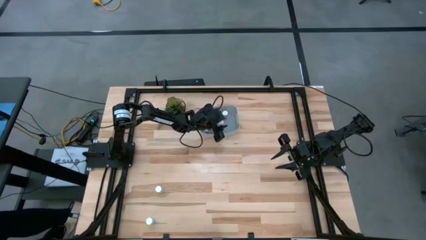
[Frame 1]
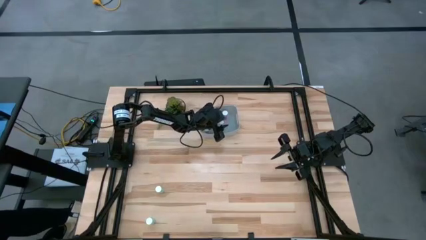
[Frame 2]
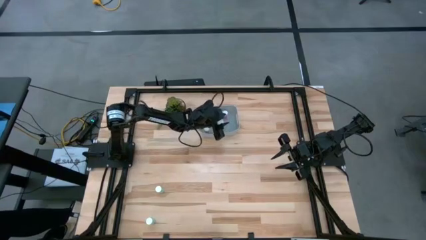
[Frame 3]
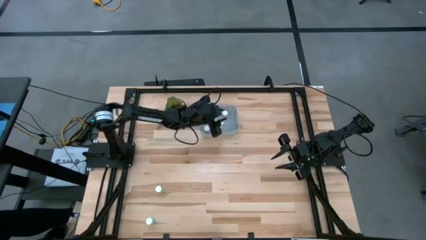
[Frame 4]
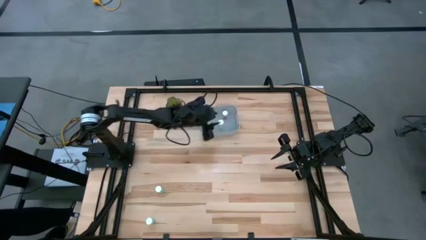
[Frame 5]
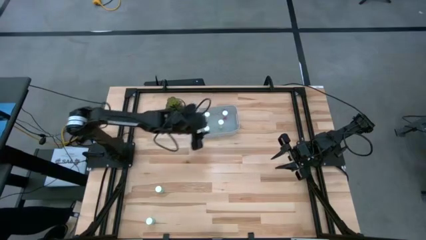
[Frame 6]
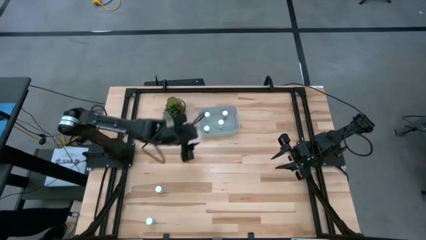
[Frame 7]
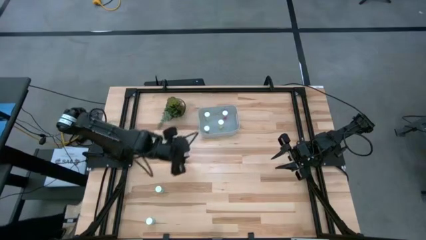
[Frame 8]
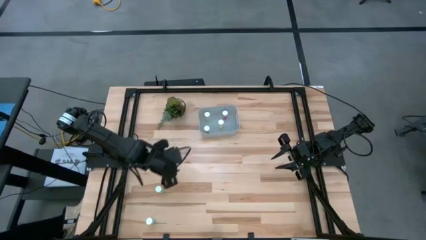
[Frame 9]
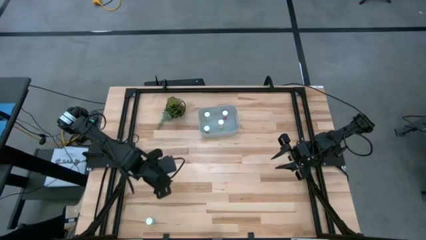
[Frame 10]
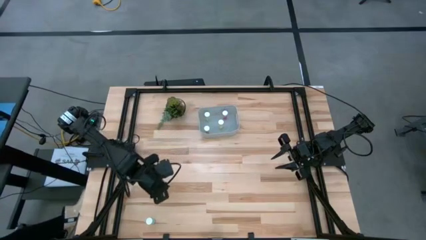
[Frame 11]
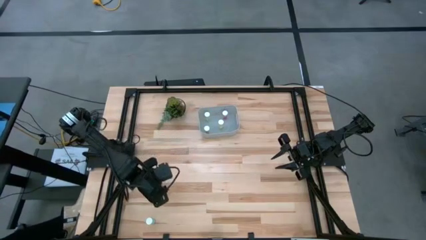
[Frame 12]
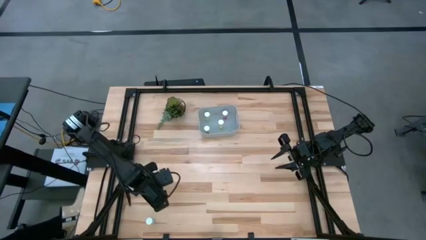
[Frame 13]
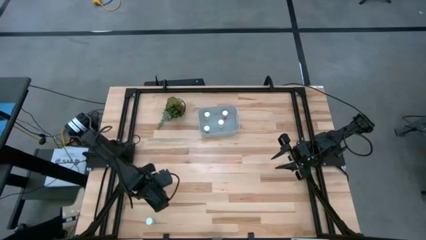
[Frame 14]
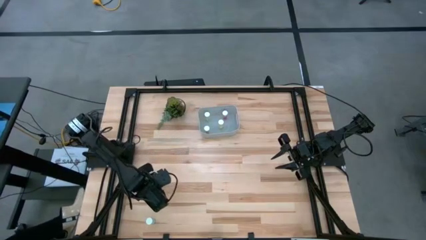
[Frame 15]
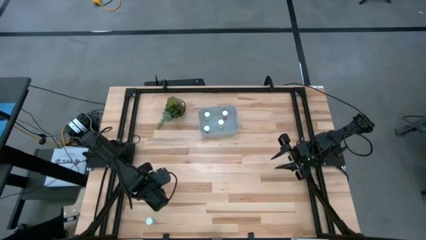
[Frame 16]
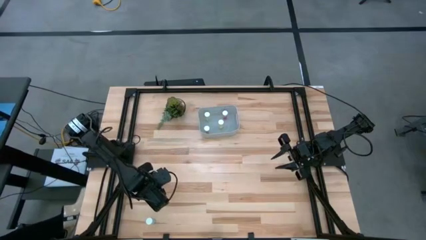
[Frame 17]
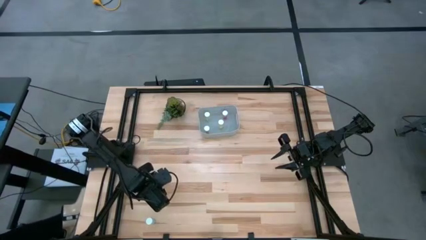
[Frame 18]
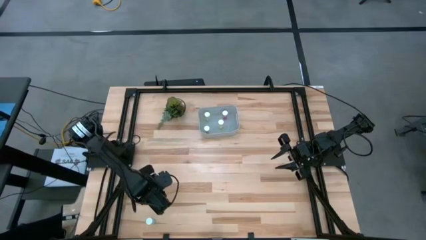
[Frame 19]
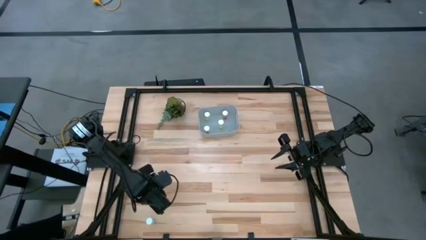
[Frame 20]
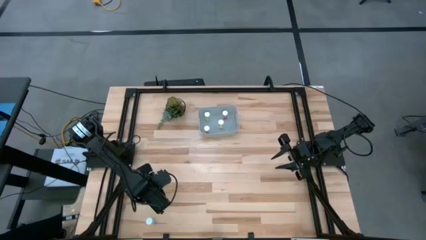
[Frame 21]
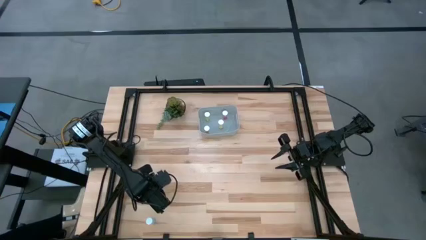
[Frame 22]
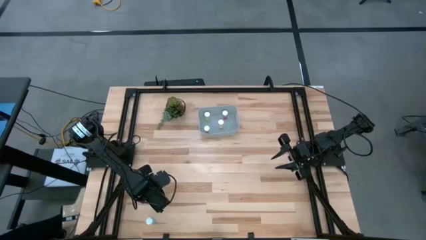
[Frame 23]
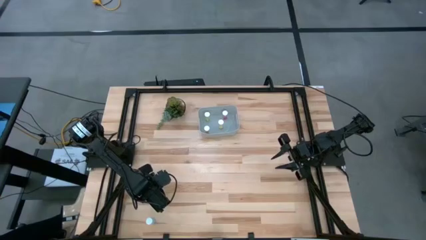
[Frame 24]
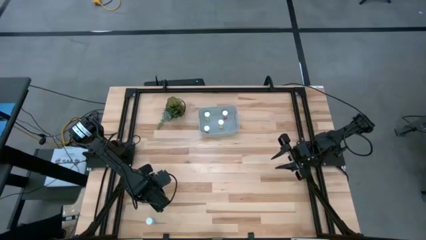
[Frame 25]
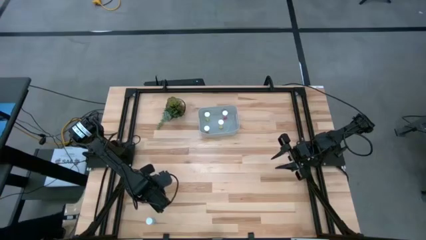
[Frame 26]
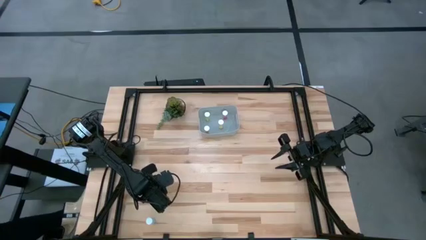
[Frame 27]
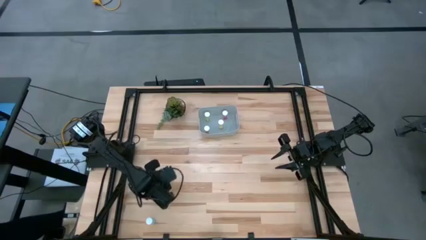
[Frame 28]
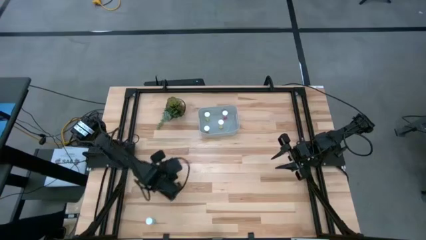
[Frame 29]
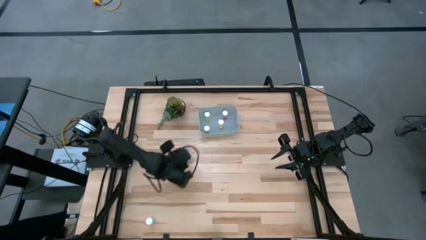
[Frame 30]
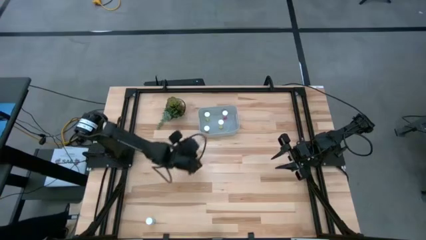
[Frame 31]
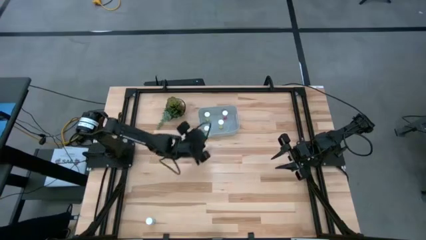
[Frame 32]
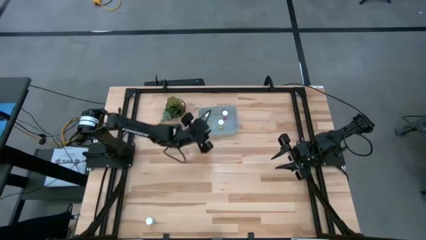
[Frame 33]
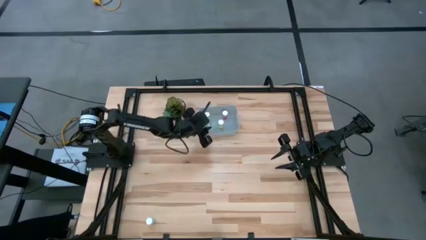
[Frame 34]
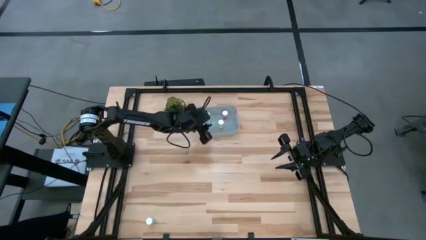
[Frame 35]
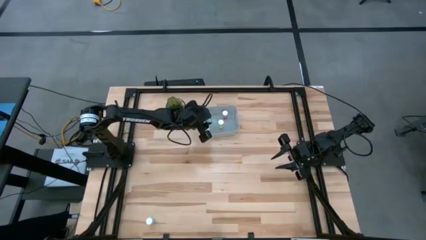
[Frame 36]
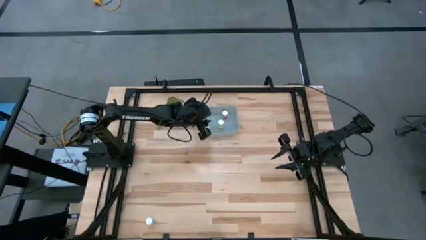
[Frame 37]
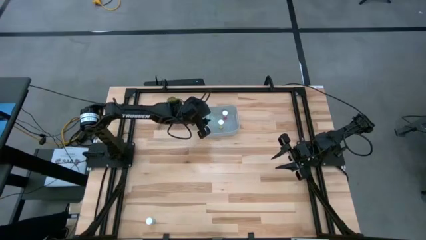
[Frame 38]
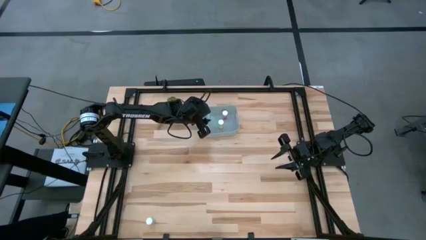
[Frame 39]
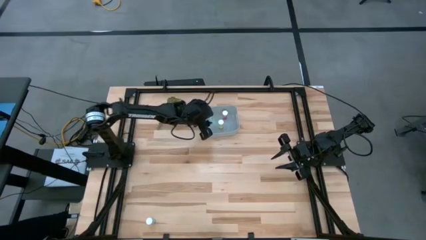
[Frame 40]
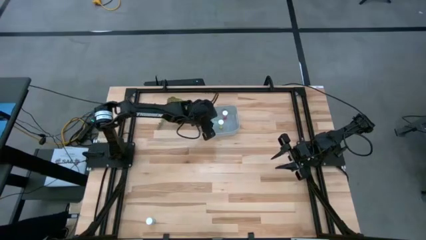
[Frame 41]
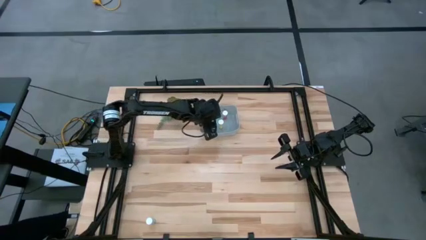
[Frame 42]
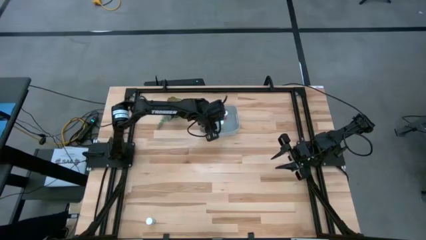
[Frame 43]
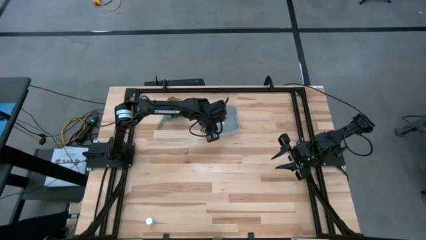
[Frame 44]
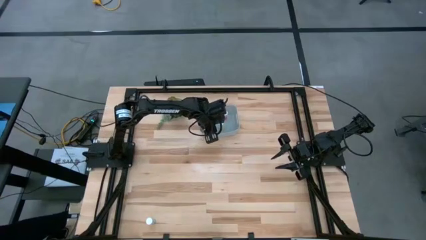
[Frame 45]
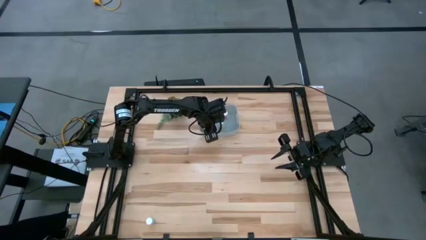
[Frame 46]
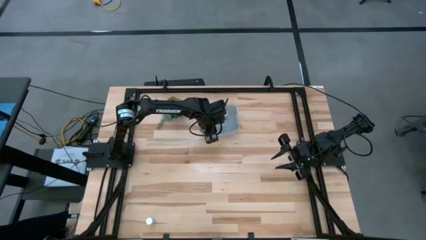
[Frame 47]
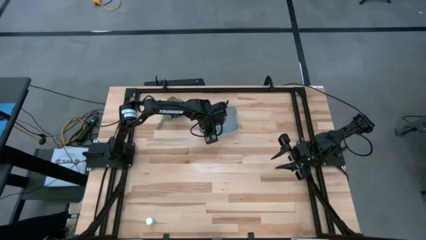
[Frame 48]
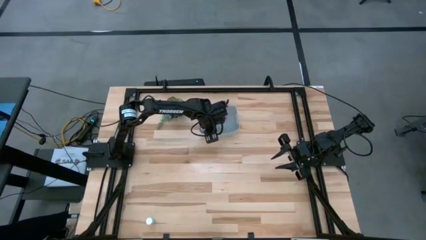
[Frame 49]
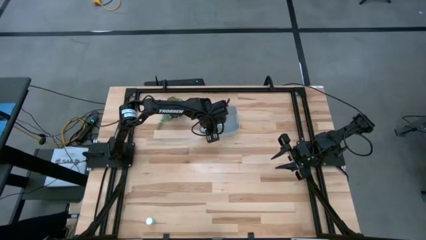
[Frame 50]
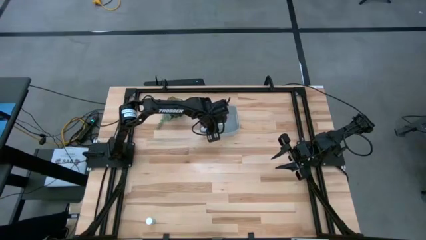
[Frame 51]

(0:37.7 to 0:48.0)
Task: Pick and place pill bottles into a basket
Put the top blue pill bottle into the bin

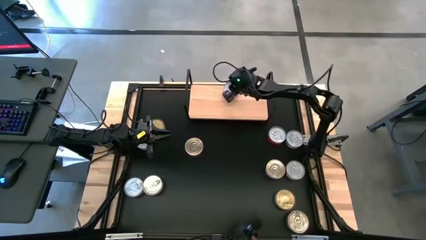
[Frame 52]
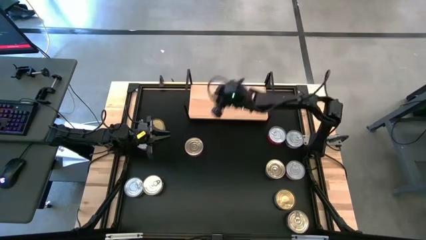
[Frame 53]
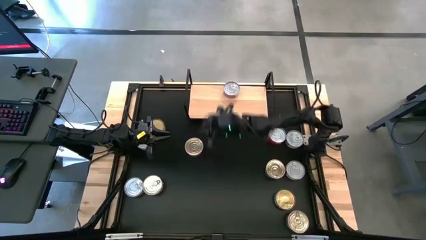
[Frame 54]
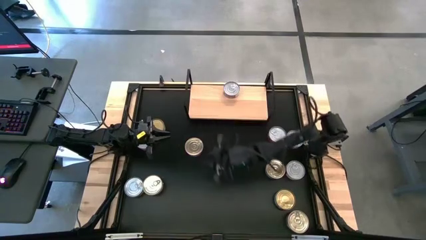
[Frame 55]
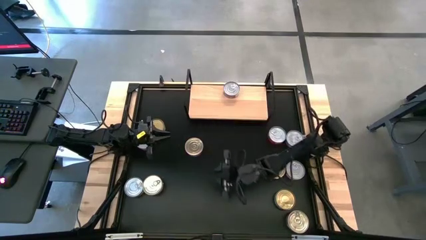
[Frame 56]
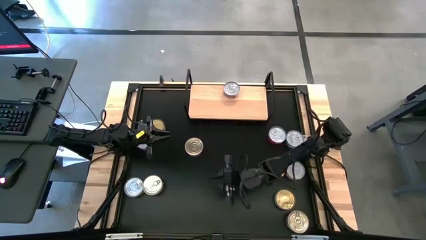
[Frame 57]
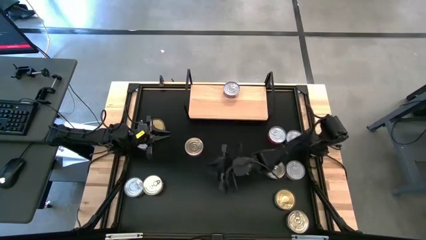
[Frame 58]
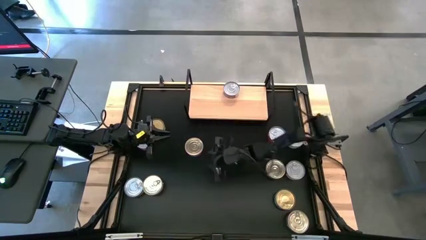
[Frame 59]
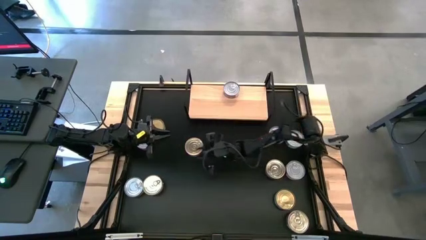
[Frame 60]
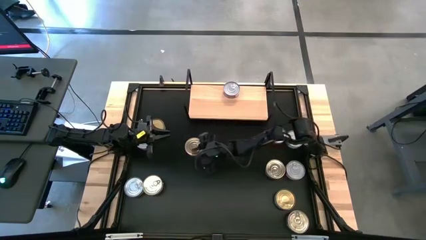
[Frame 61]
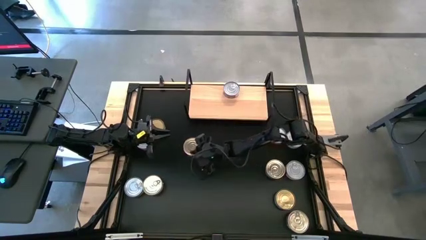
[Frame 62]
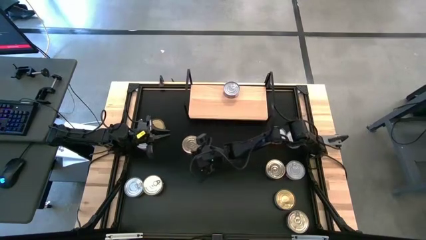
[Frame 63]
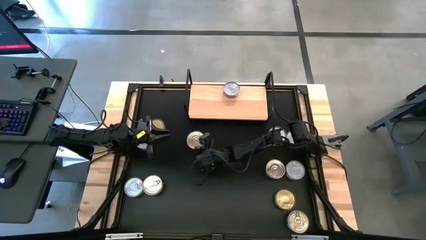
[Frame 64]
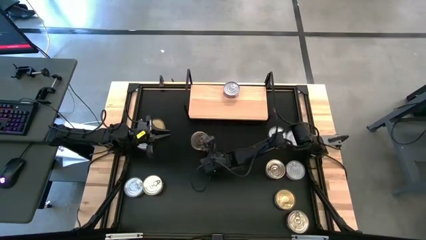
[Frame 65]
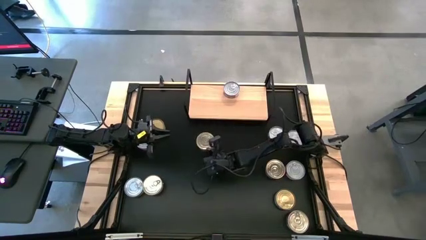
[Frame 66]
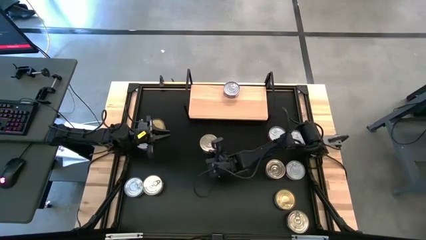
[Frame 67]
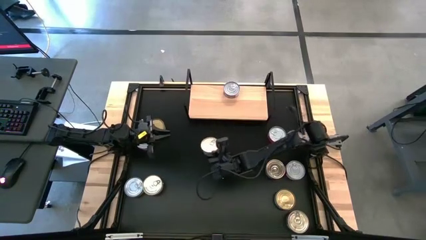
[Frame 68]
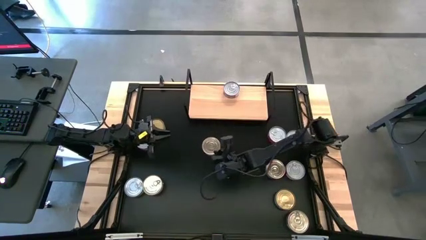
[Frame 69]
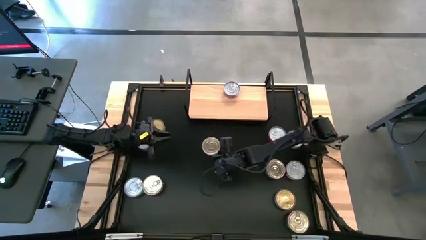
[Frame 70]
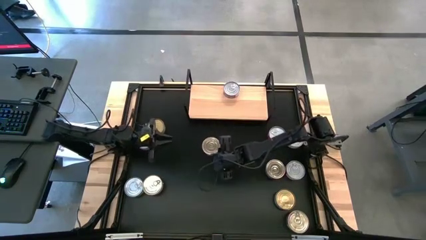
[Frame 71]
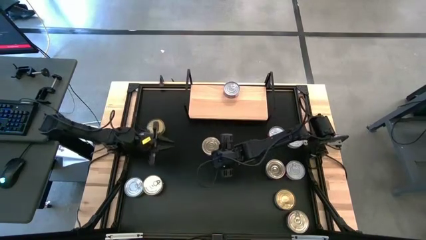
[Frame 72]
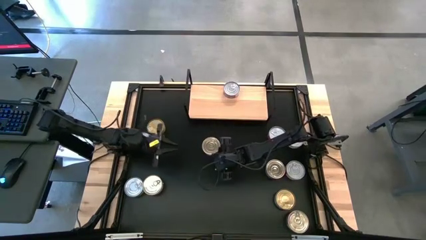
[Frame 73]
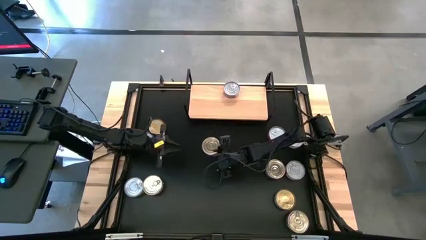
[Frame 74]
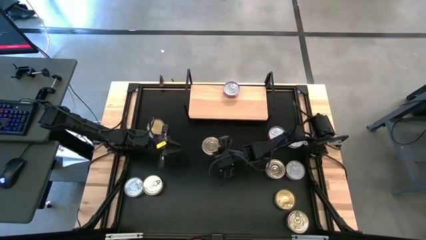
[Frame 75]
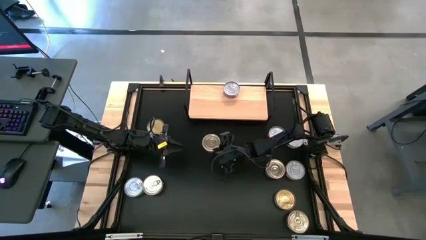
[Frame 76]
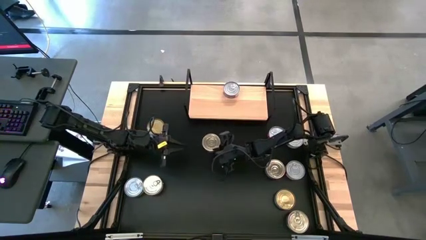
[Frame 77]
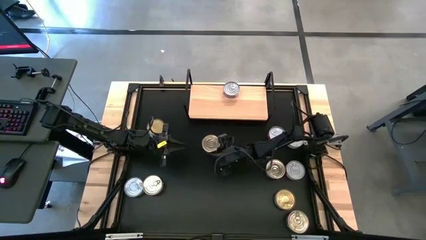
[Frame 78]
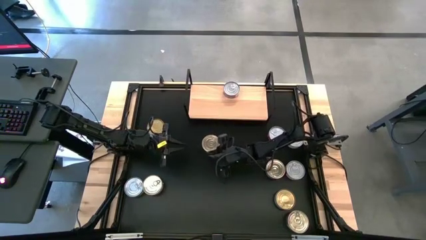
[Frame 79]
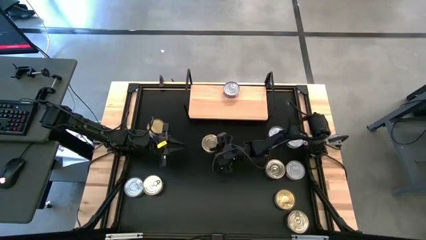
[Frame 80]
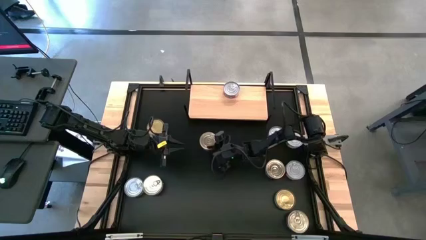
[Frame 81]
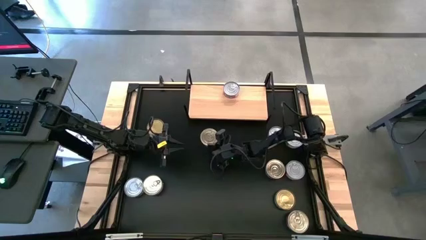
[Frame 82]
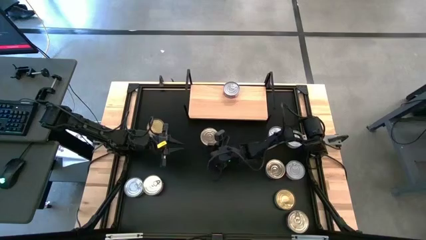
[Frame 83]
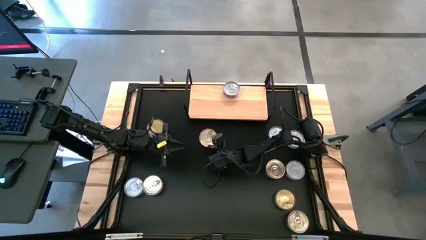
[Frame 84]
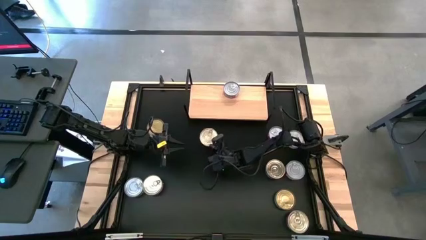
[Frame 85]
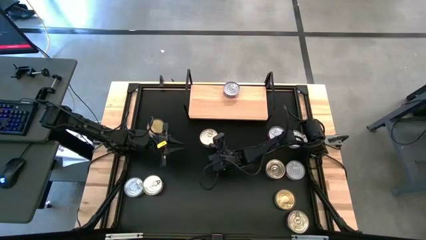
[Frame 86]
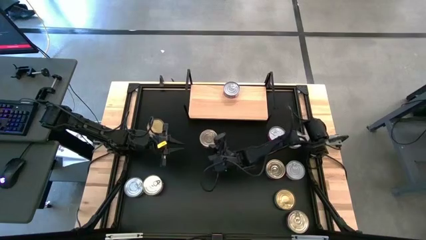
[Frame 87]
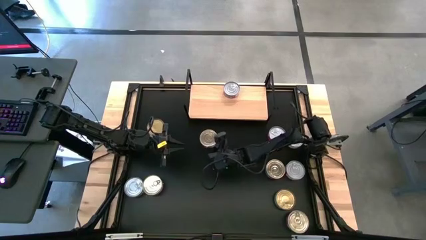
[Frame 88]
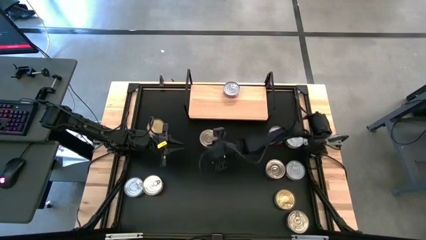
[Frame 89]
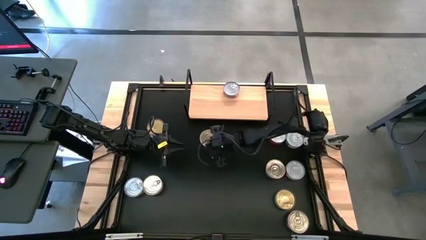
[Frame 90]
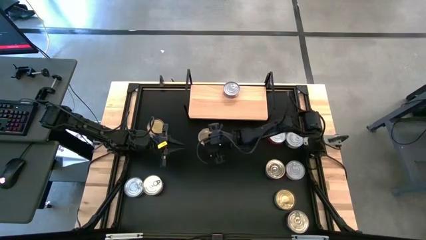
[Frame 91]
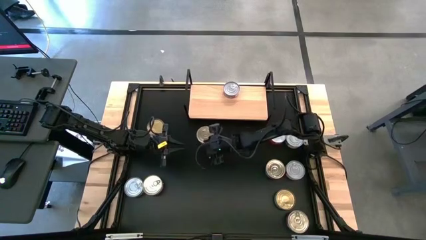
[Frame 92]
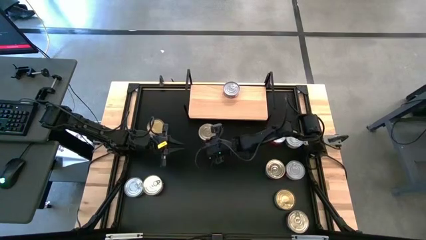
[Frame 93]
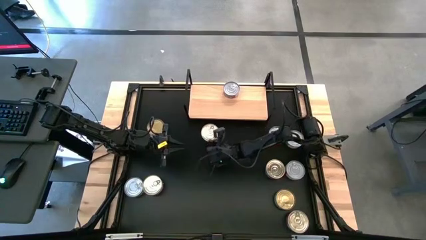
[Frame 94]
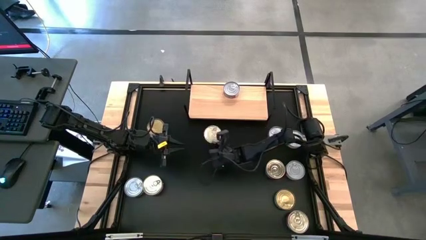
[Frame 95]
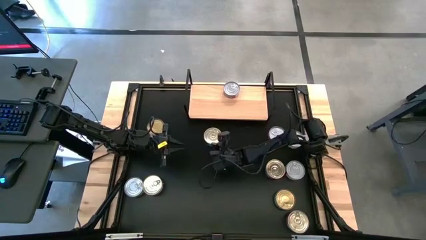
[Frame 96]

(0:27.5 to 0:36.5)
Task: Stack canned seafood by type on shelf
Put the blue tuna can on the shelf
